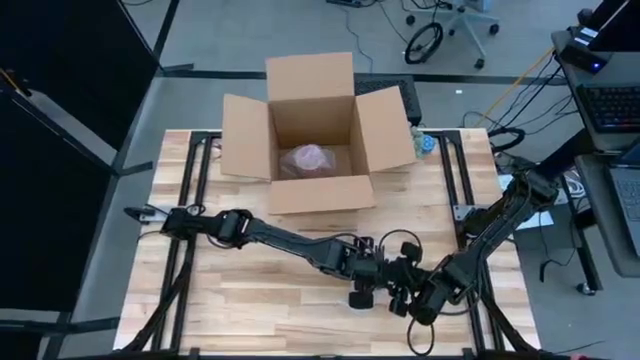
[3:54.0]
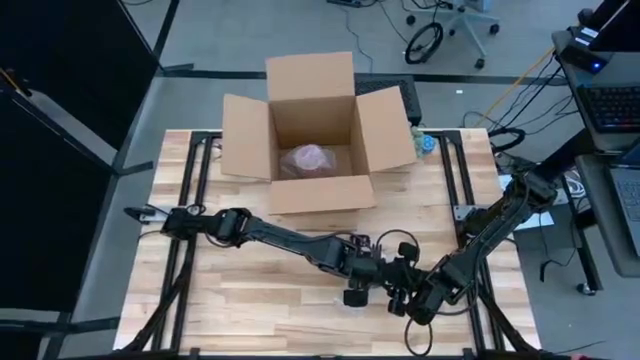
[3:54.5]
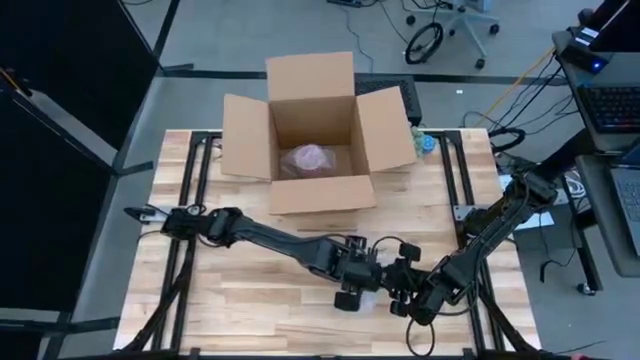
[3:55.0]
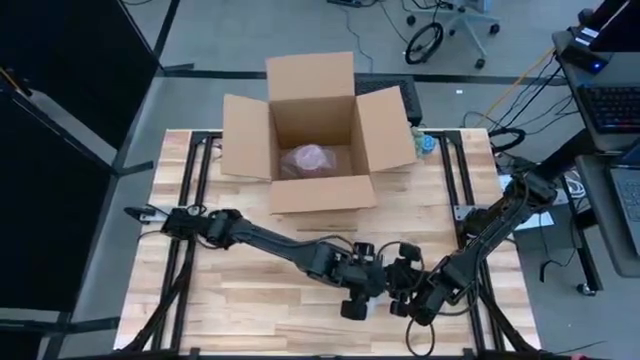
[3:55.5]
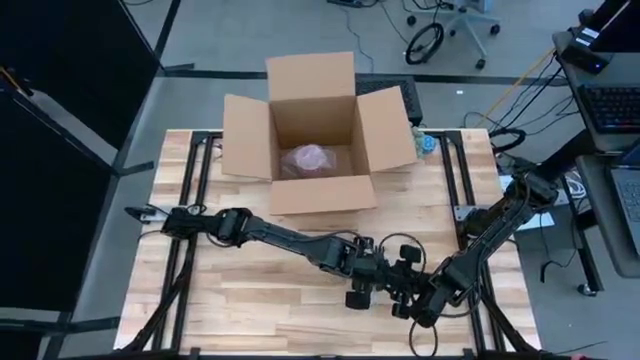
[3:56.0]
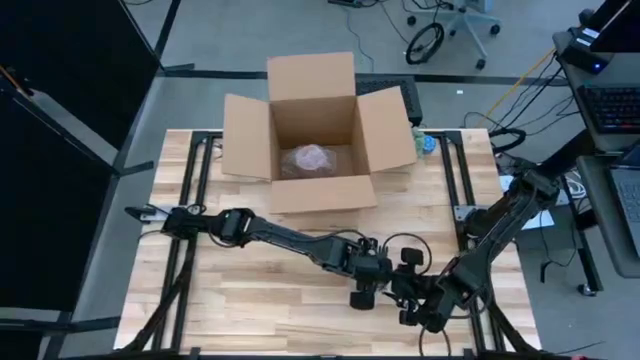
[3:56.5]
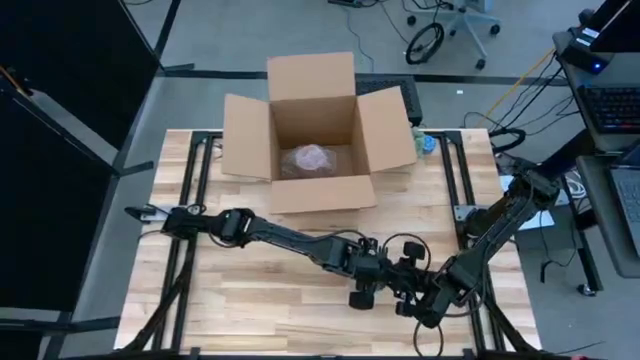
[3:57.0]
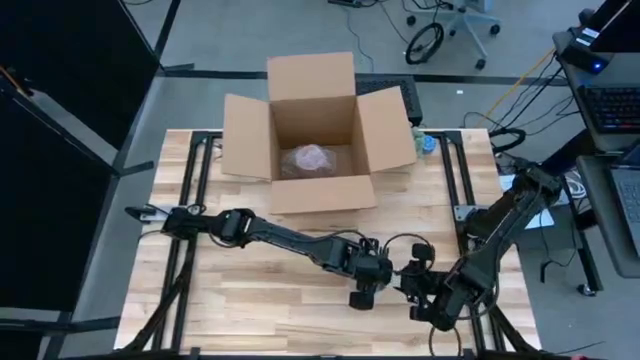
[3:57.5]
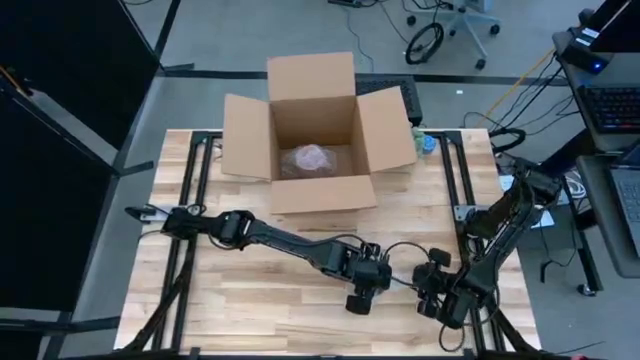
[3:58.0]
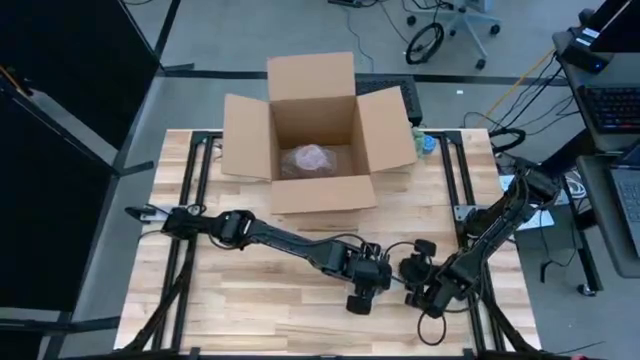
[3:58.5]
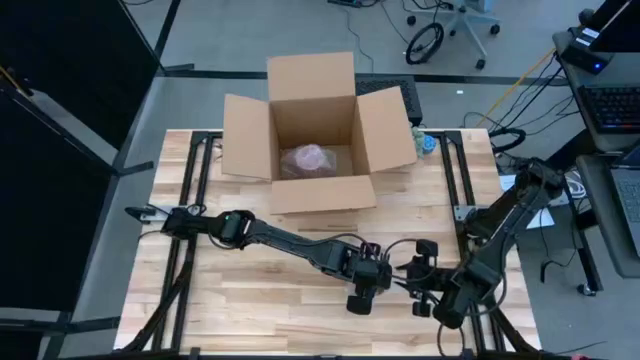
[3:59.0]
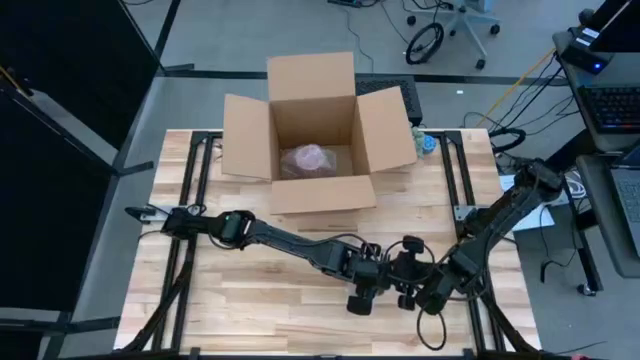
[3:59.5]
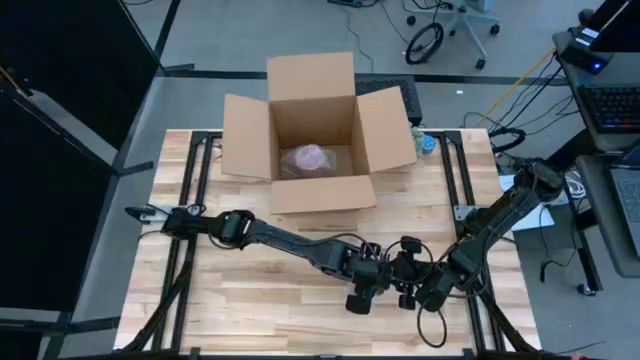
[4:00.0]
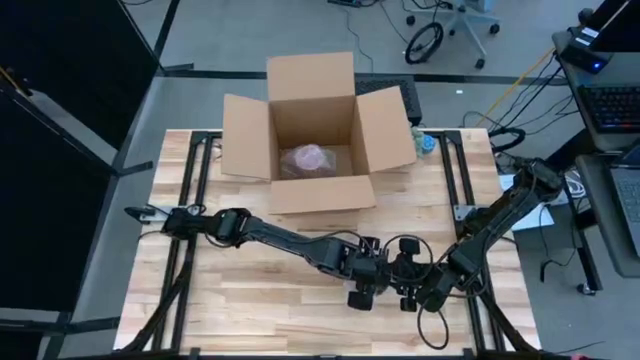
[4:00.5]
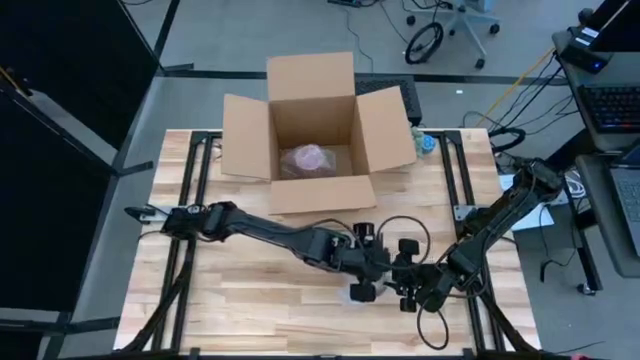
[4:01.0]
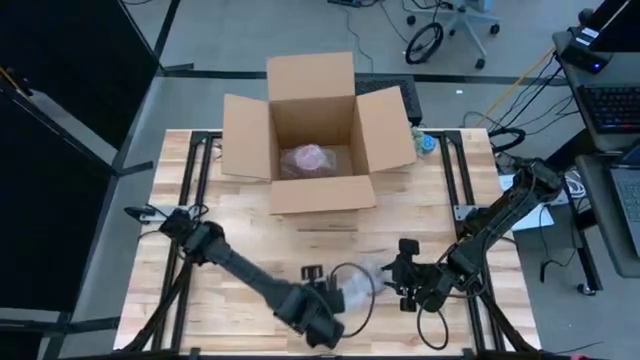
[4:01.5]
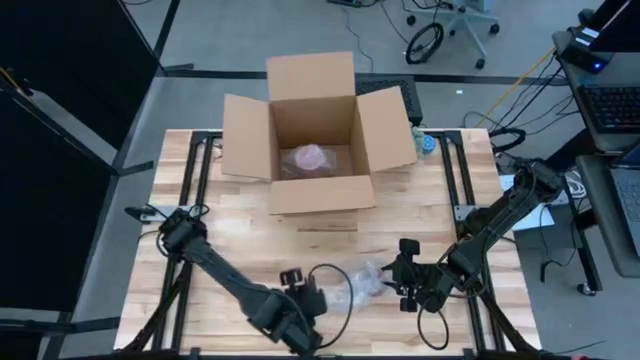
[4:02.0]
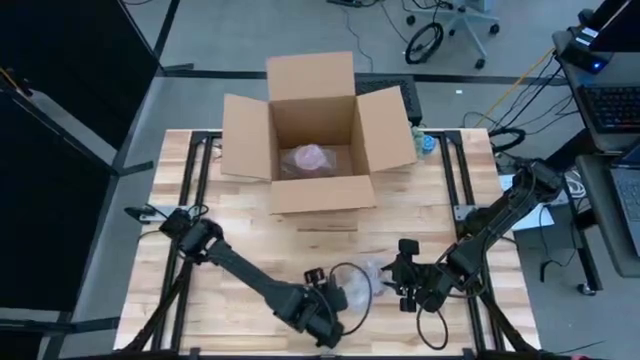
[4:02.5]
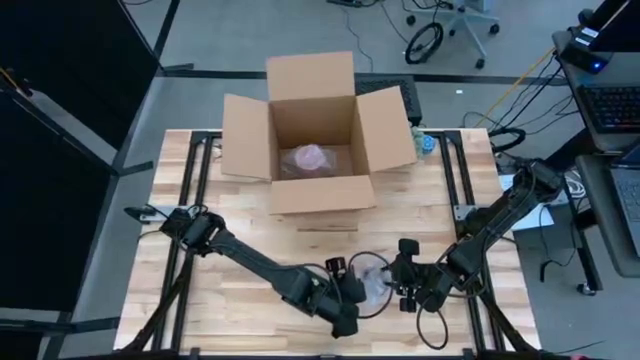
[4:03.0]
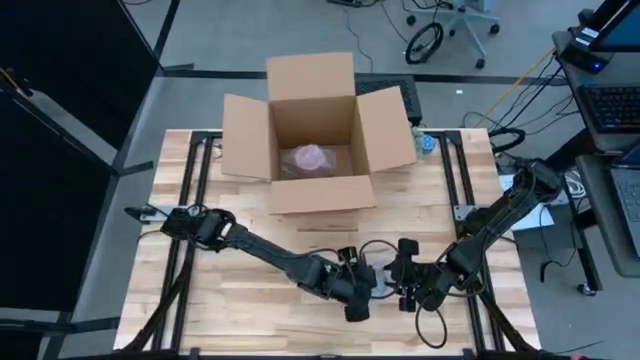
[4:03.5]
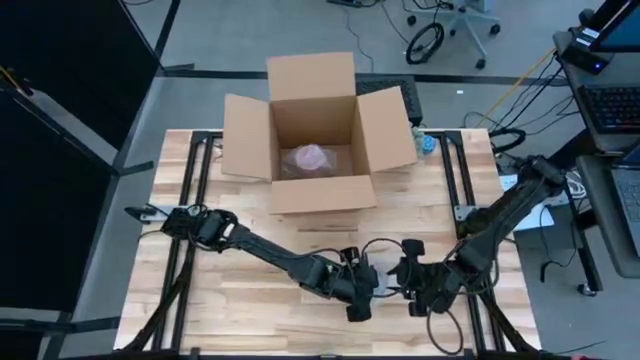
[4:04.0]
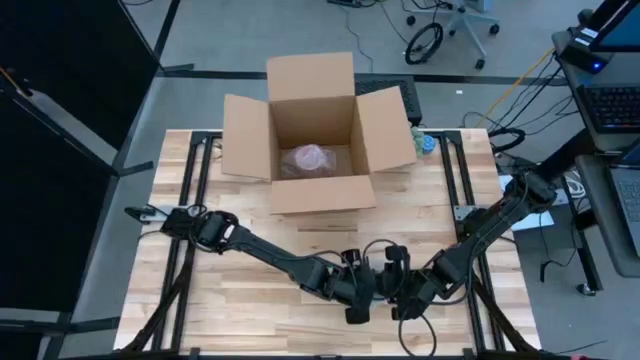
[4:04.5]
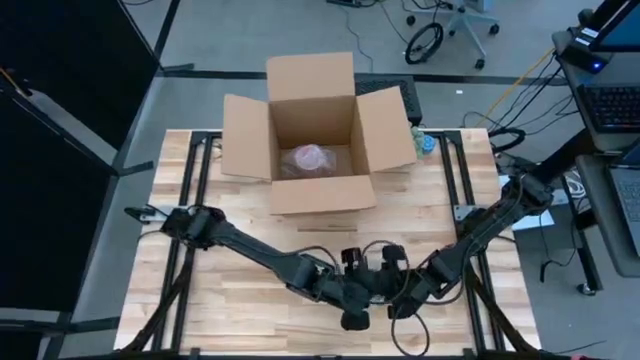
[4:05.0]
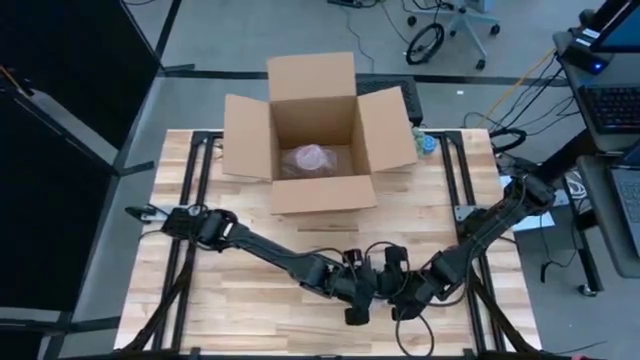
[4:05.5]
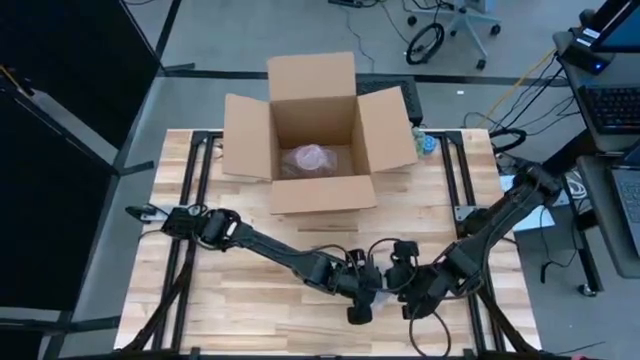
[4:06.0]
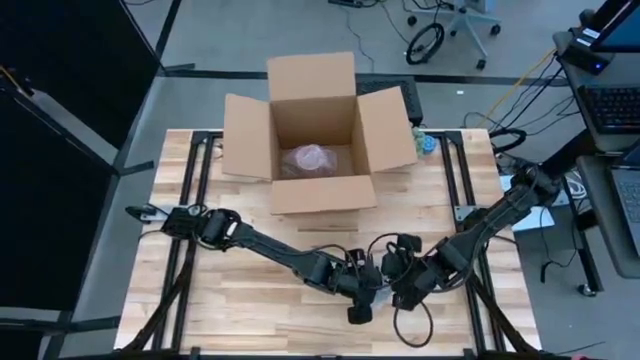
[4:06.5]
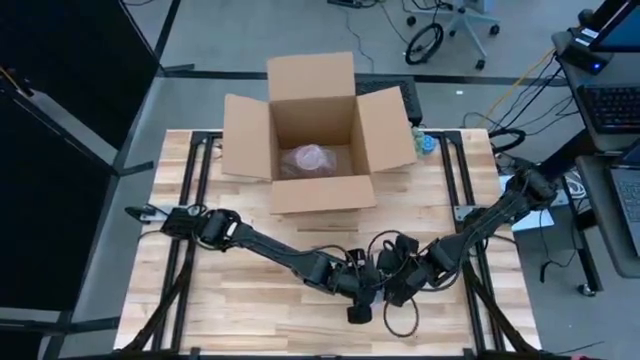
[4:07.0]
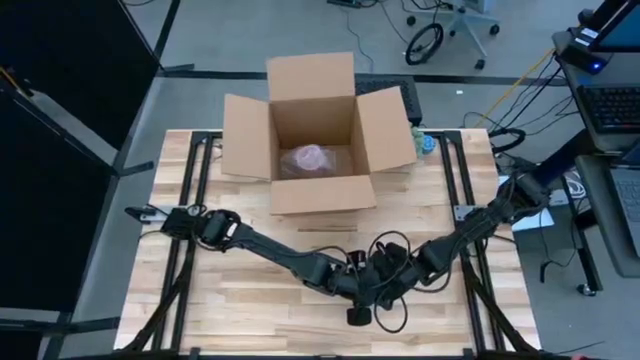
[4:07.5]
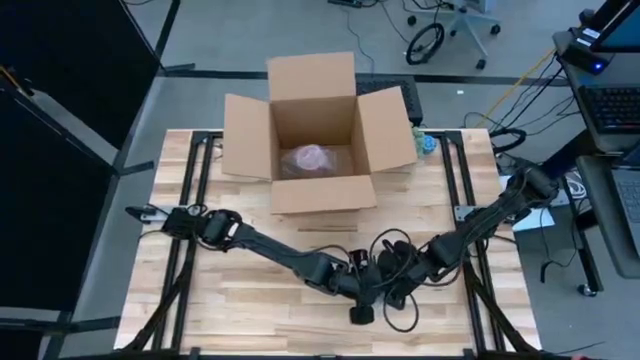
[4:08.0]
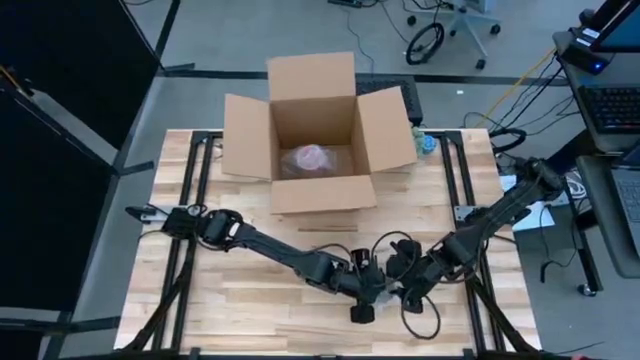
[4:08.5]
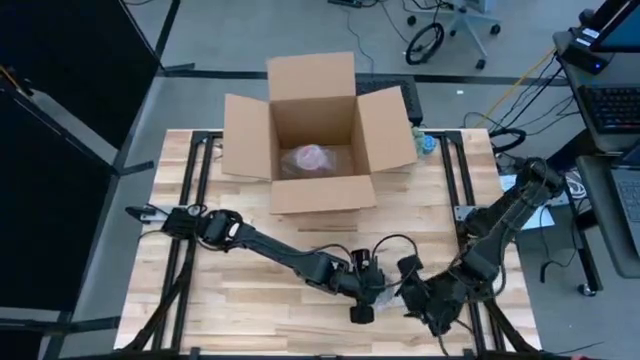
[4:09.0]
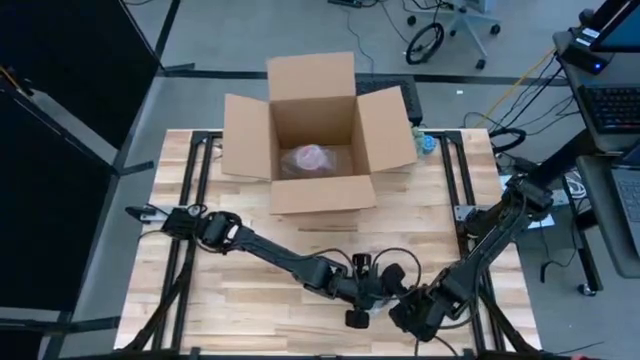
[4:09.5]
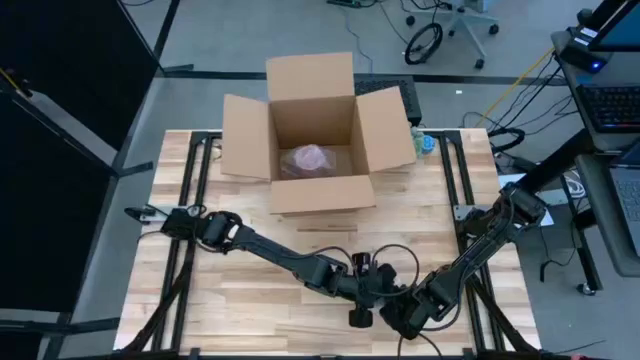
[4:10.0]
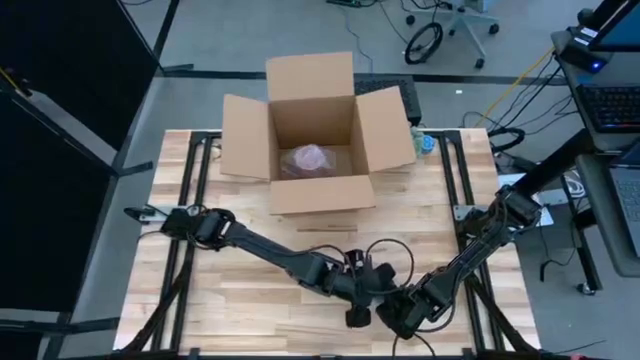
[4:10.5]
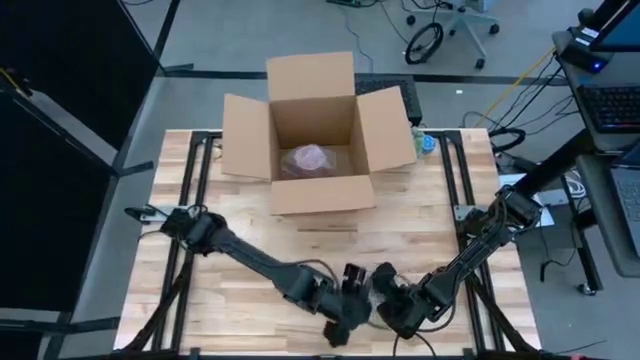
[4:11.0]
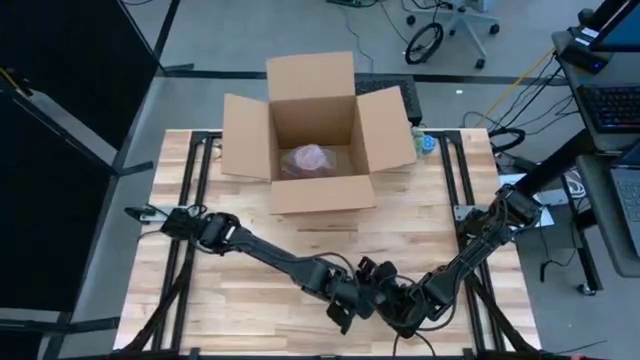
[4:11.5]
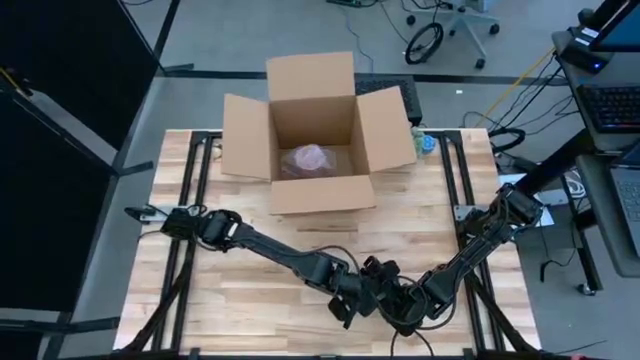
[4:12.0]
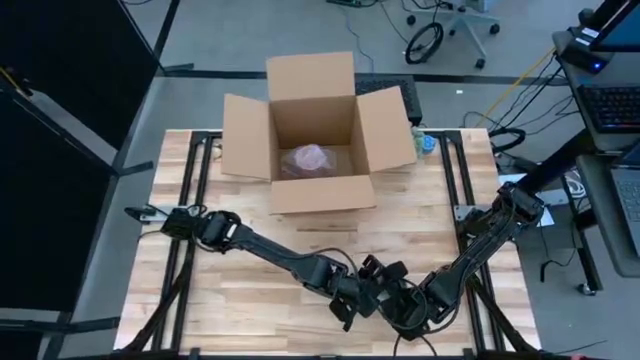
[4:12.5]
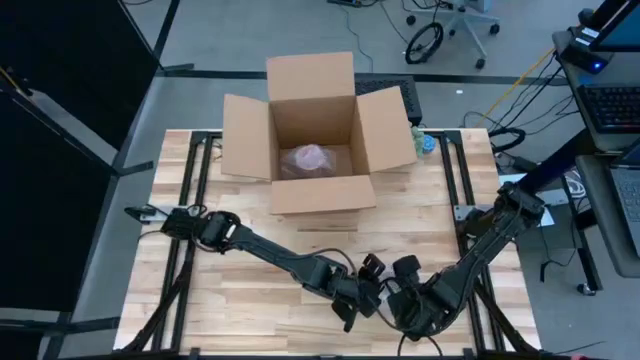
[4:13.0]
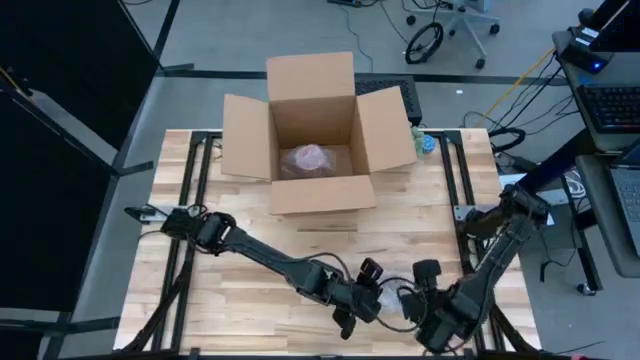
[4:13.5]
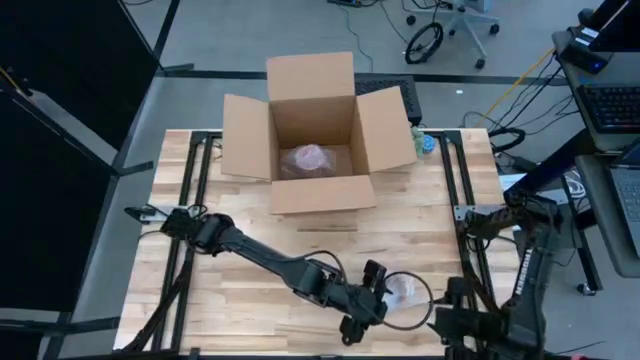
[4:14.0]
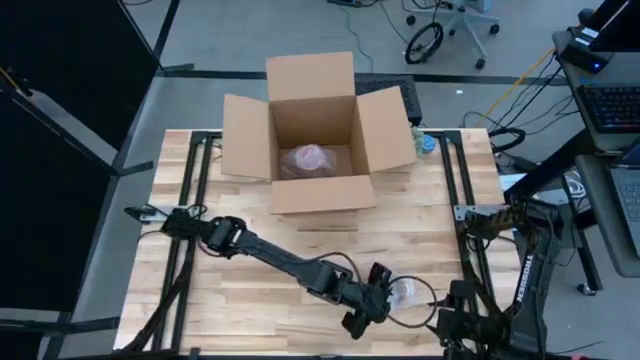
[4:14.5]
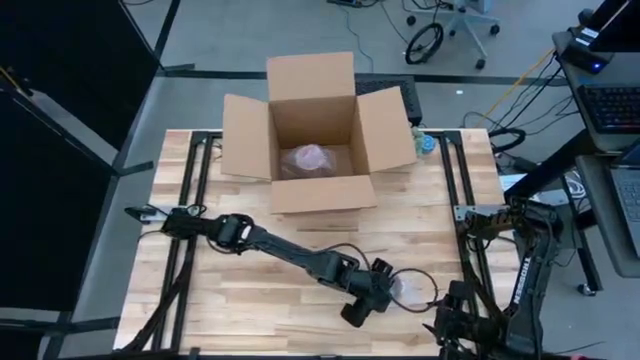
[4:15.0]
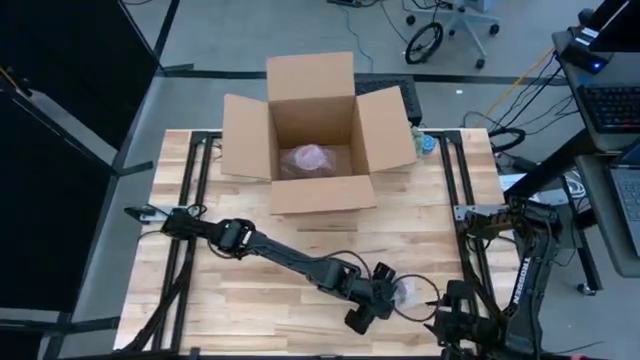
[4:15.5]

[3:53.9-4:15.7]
Task: wrap mug
Wrap the pink mug with transparent bubble wrap
